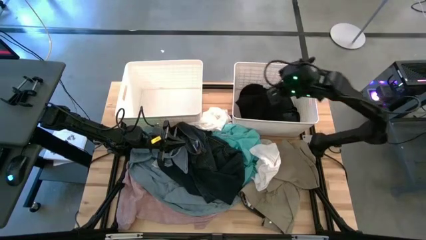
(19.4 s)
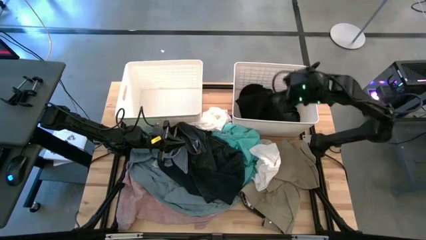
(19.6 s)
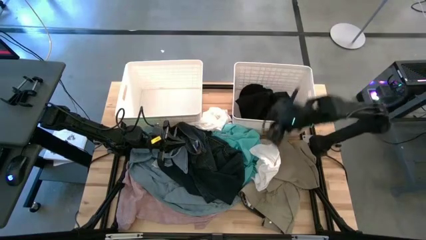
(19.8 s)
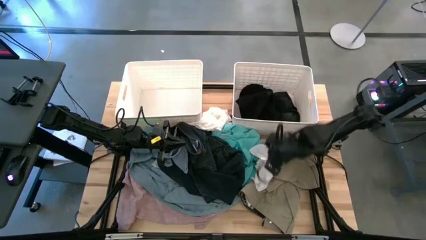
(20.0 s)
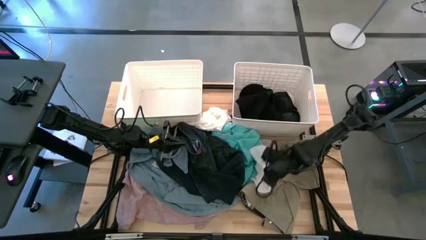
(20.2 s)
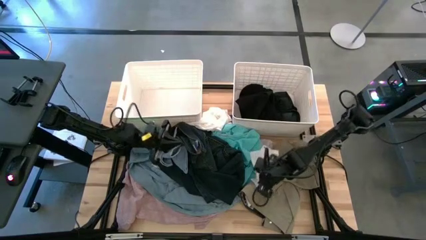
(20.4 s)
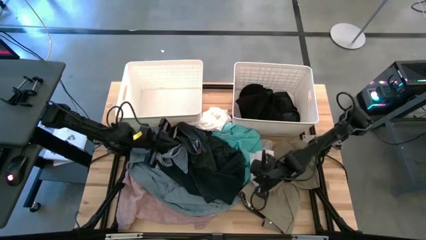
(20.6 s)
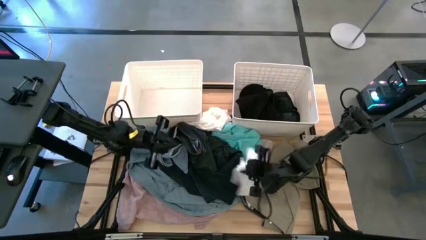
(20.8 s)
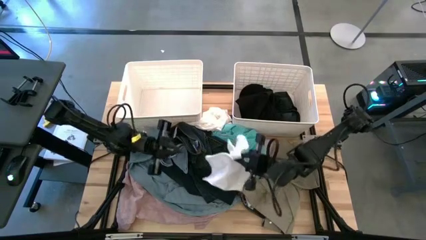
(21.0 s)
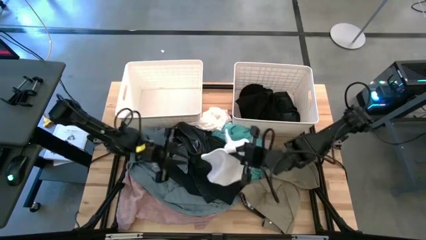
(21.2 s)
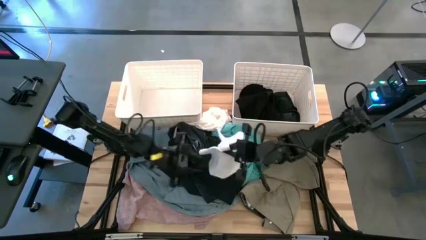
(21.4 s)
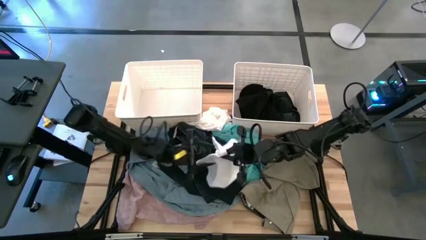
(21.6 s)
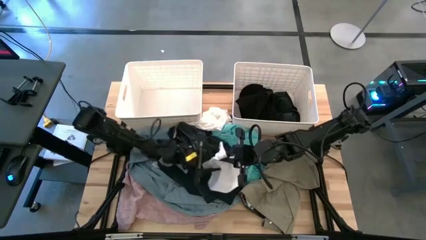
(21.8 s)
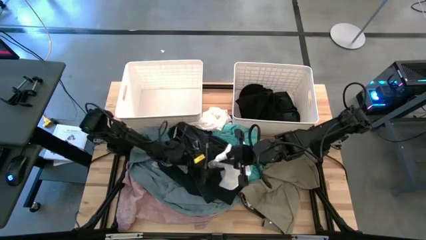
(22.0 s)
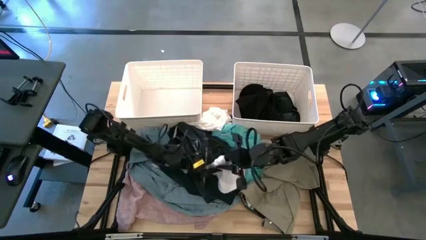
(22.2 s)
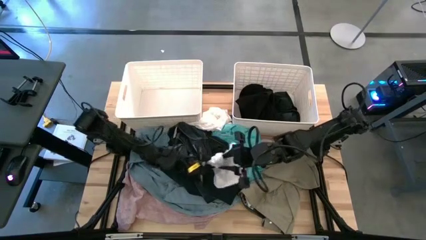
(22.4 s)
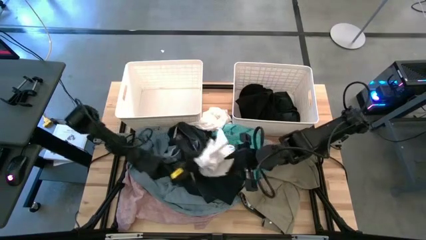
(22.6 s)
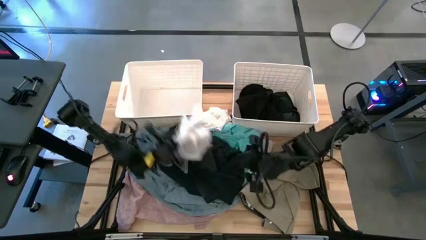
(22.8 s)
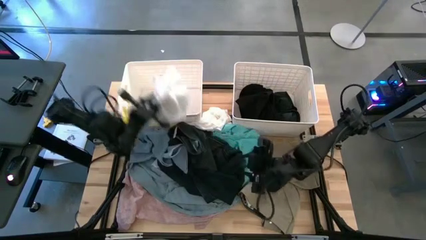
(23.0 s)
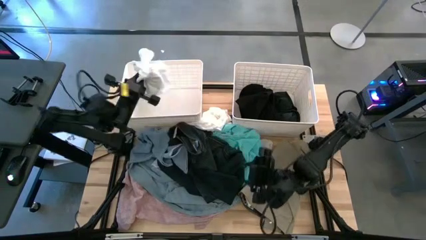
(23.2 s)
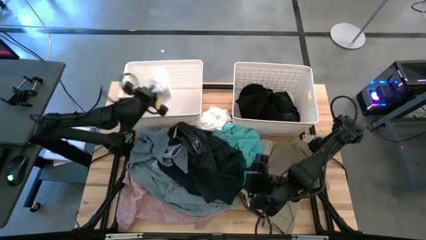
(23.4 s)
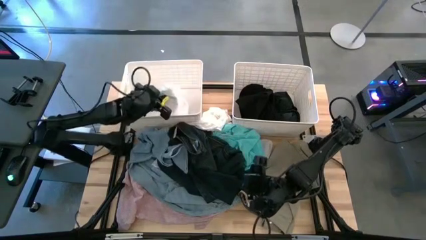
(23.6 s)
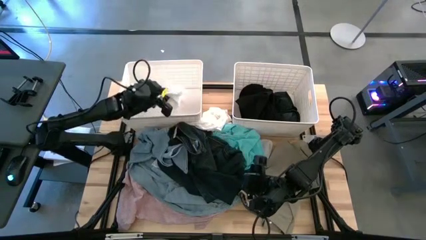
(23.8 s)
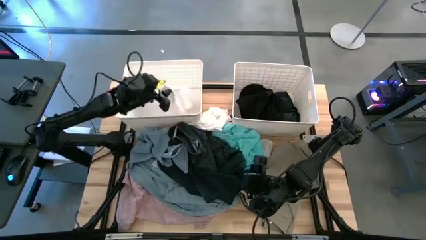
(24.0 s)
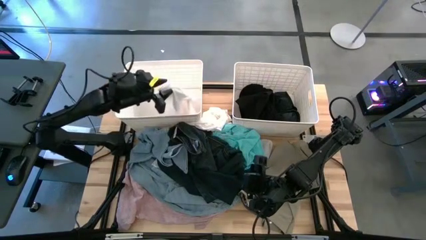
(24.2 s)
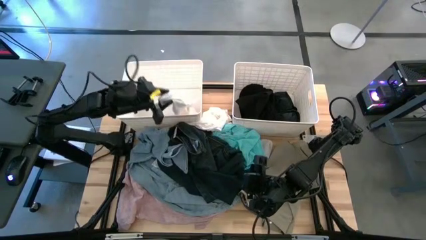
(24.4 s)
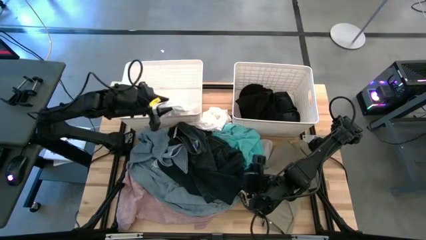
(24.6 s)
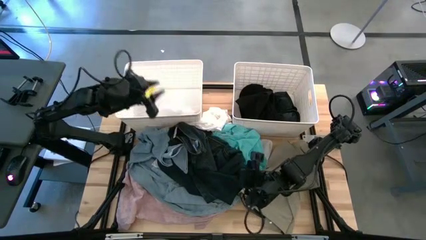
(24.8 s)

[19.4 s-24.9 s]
Task: Sort clothes
Put the white boxer into the left white bin

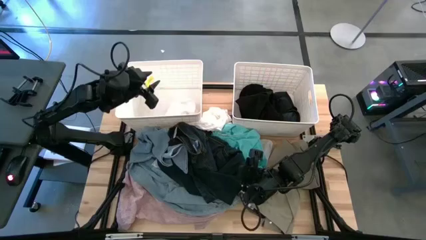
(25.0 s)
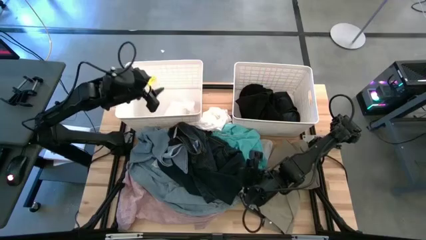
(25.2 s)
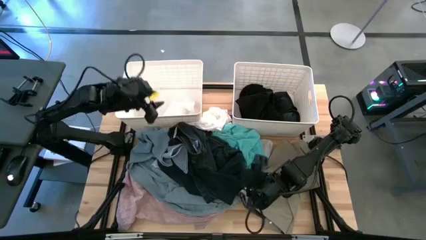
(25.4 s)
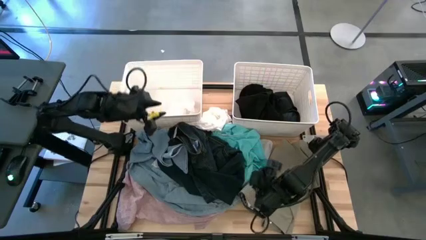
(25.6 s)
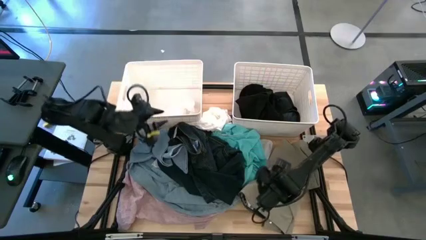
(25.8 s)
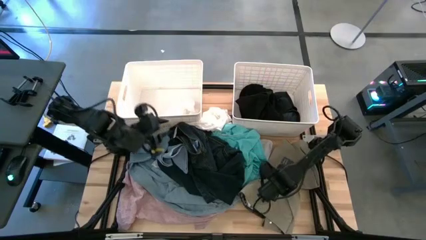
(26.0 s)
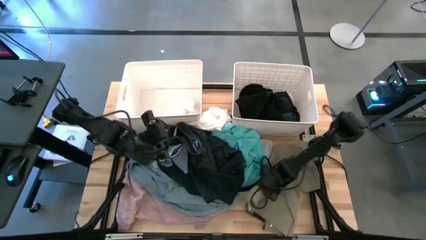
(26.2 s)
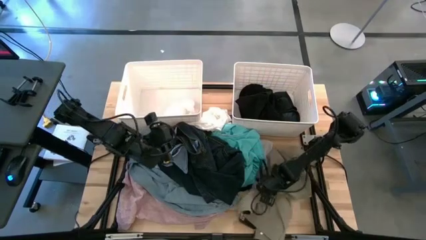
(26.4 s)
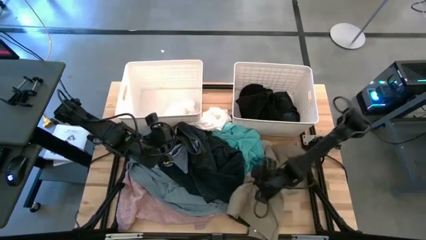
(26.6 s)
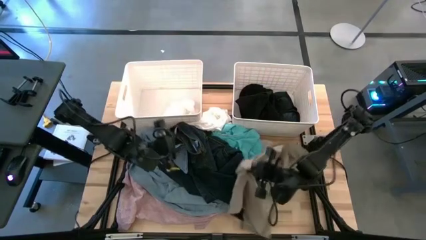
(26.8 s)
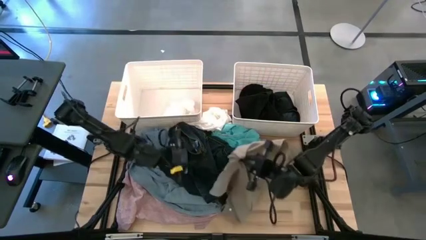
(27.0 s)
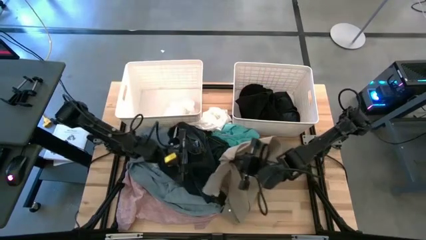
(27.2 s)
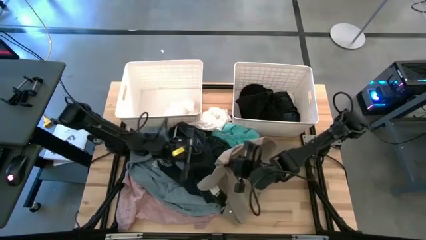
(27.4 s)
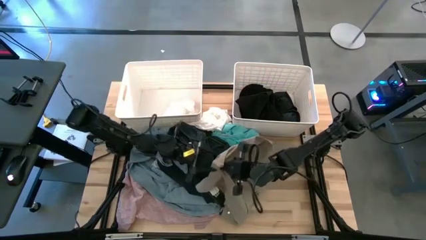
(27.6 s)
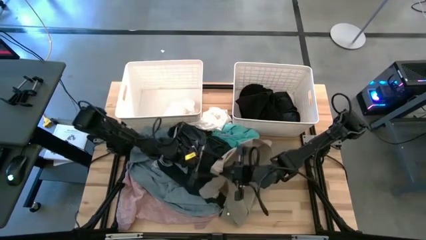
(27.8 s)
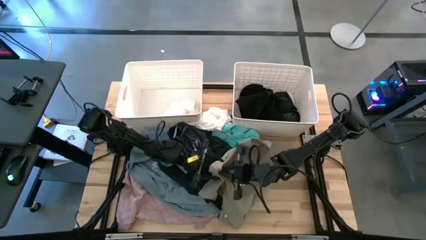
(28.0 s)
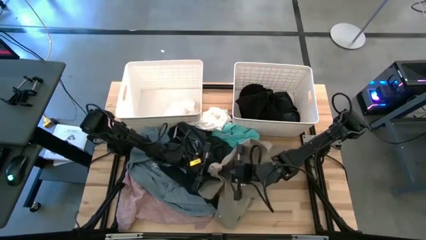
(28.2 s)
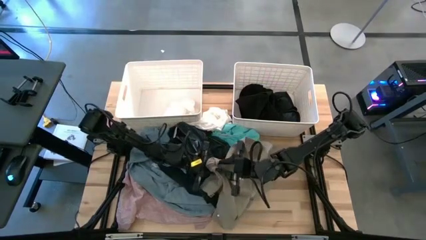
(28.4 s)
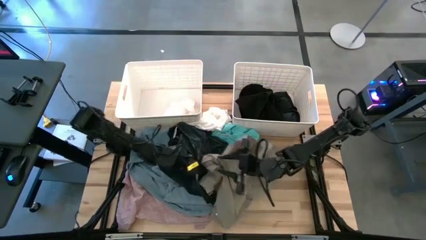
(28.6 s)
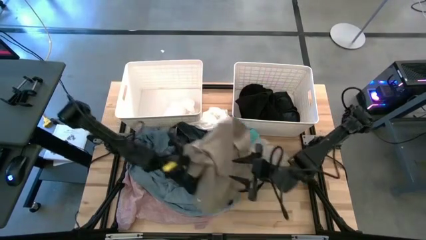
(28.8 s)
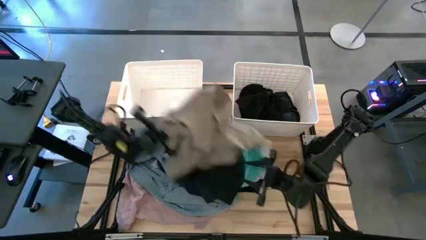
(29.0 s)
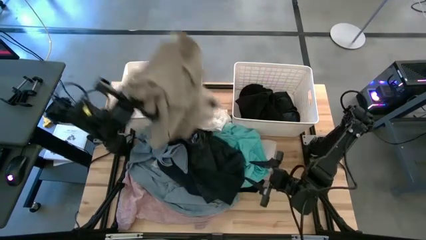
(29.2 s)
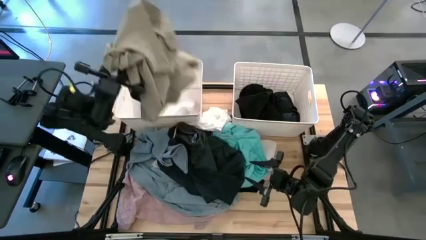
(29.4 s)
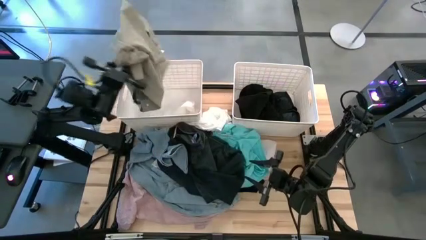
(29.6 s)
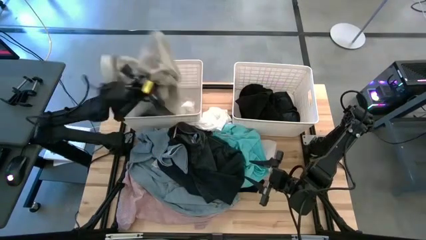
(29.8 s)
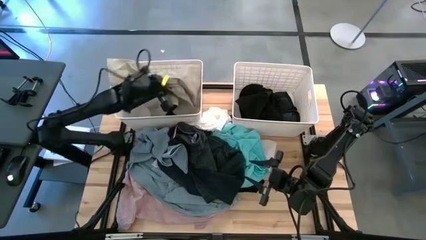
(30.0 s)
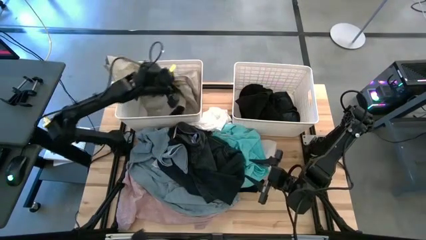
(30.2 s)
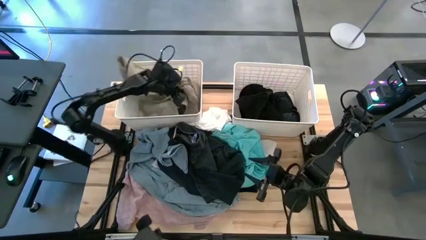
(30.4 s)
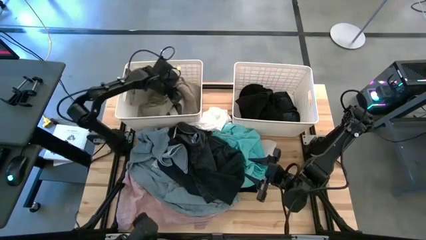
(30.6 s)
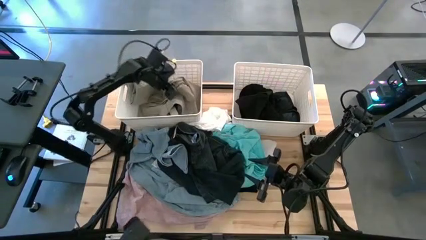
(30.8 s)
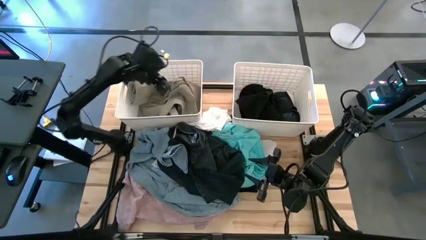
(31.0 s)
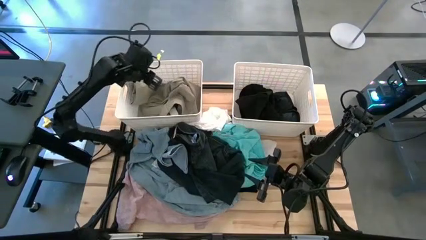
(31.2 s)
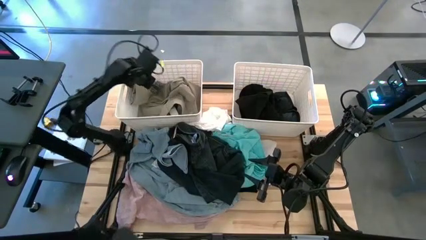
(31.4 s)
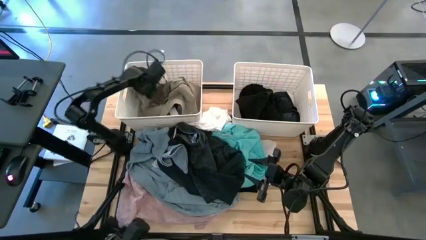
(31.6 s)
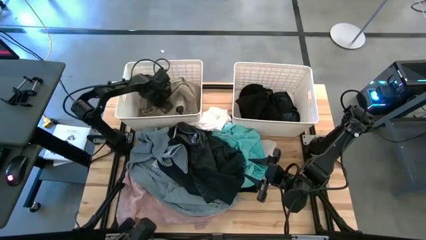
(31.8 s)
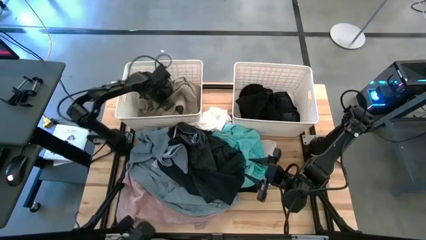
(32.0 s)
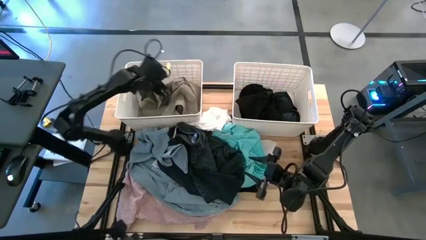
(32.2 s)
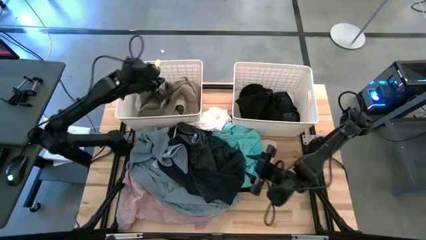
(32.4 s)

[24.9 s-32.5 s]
Put the brown shorts into the left white bin

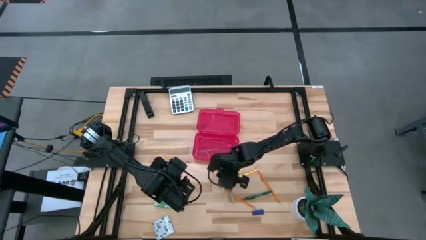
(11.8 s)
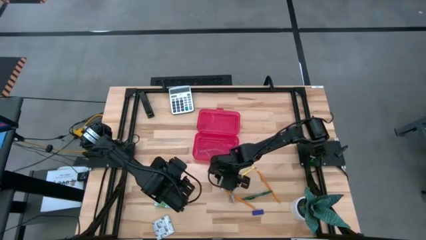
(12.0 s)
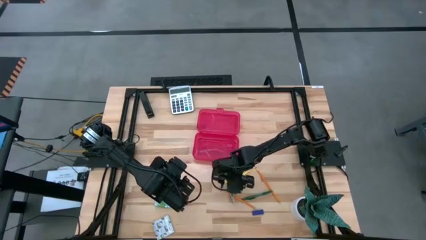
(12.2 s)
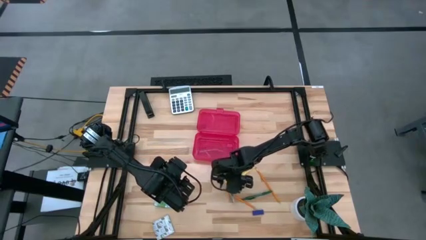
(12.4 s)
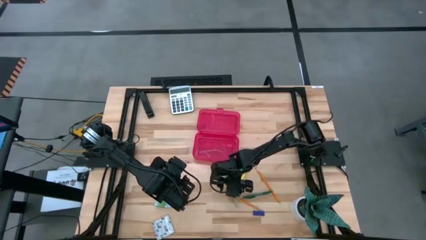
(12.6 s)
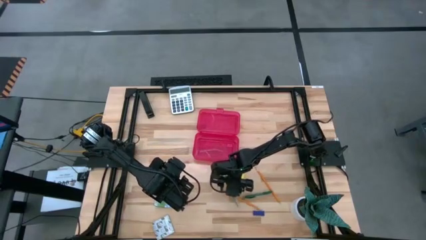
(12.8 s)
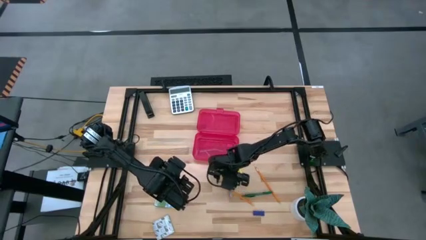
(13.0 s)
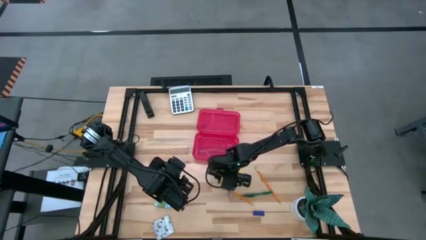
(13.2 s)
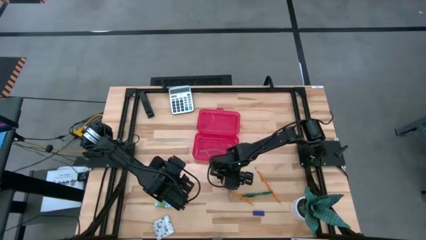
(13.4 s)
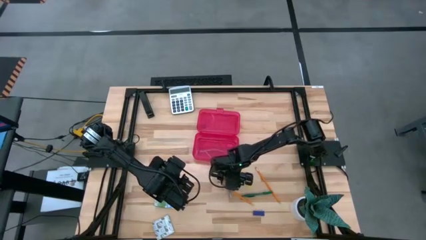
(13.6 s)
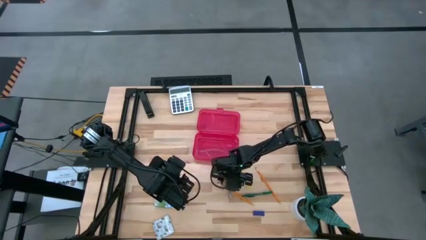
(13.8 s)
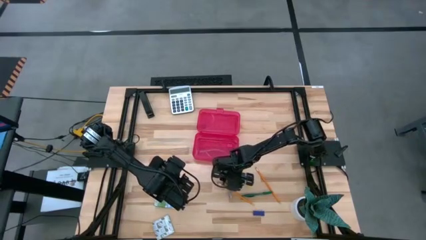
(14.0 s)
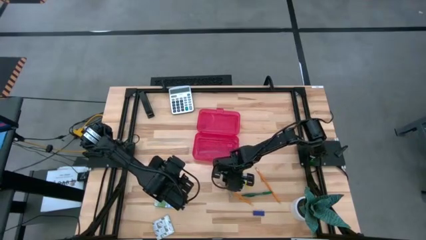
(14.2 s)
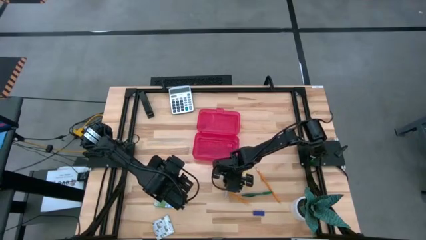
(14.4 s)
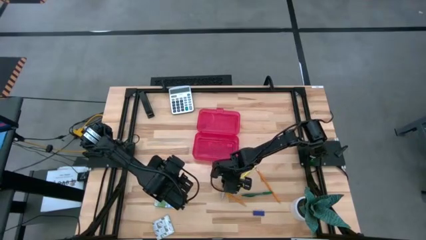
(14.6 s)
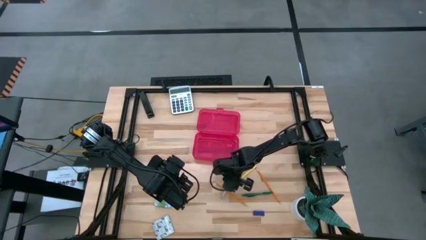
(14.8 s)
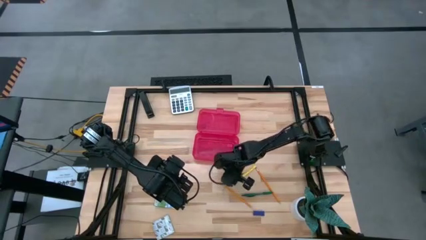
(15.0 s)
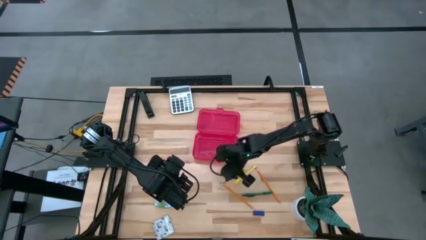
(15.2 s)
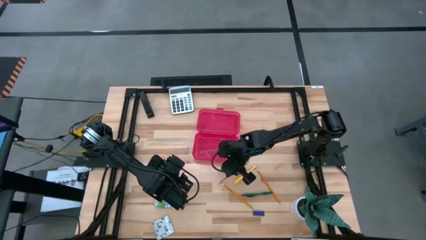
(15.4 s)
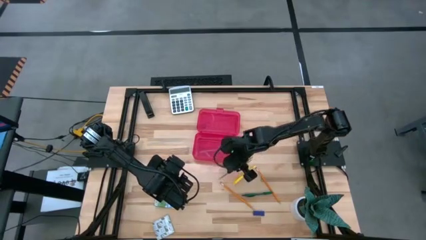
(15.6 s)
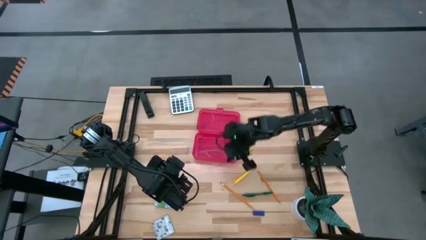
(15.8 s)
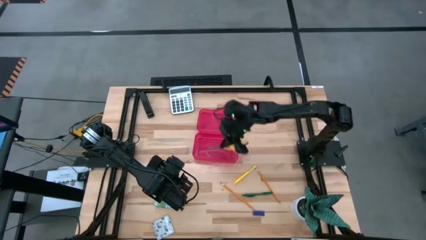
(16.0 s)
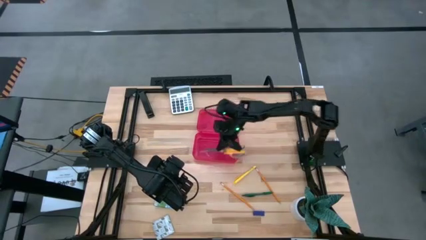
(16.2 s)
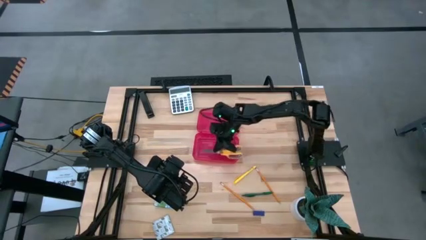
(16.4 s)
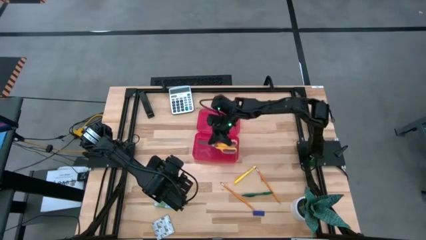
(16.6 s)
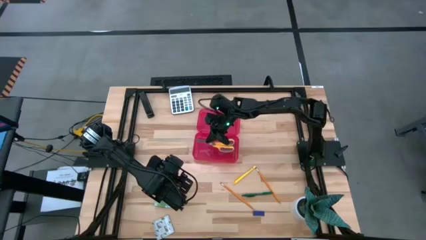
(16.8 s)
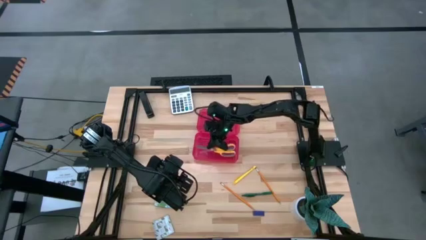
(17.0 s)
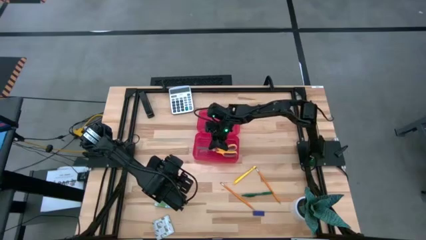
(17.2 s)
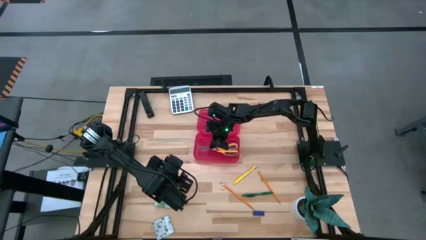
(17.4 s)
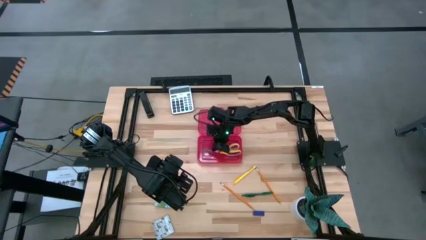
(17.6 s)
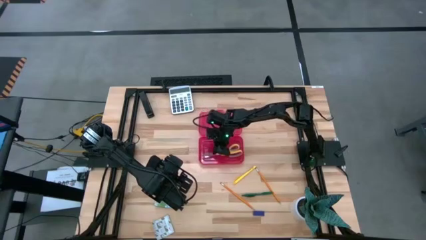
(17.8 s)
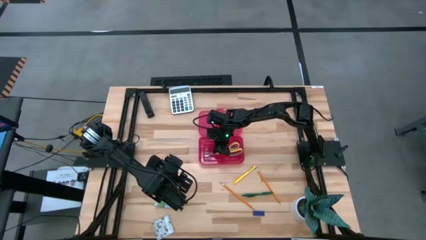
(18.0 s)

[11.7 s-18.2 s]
Task: Pack school essentials
Put the yellow scissors into the red supply box
